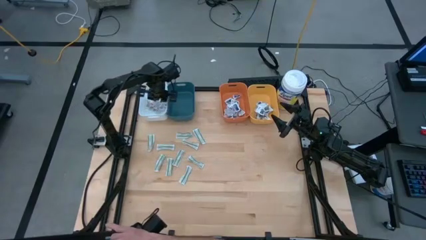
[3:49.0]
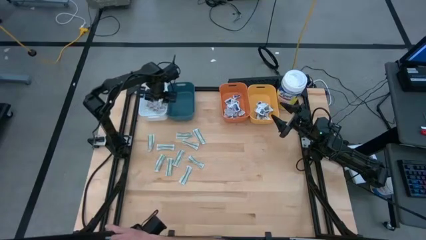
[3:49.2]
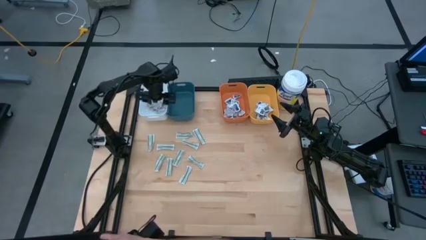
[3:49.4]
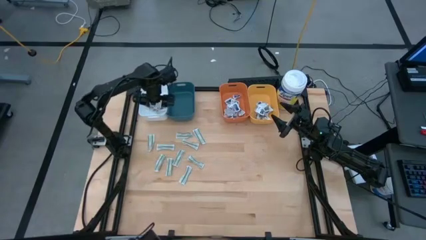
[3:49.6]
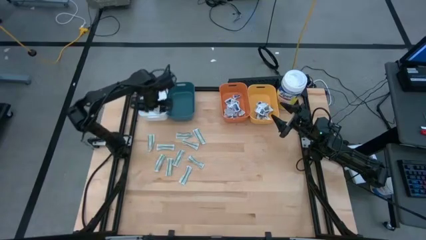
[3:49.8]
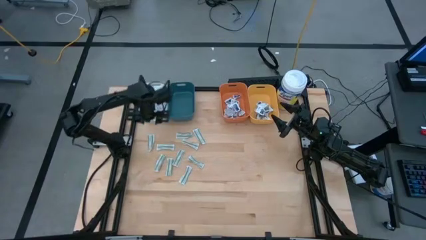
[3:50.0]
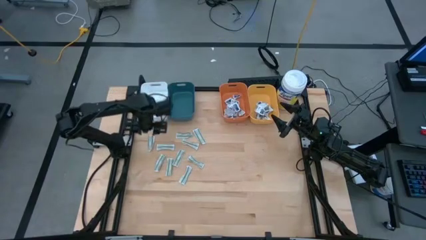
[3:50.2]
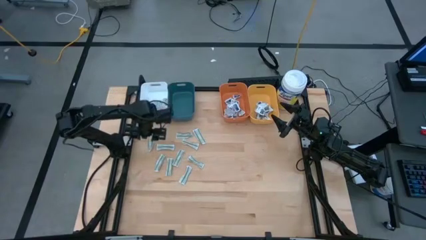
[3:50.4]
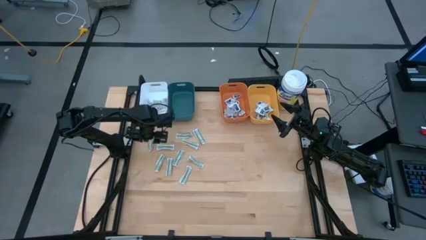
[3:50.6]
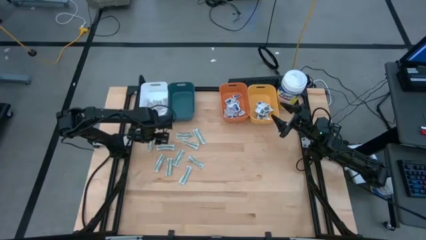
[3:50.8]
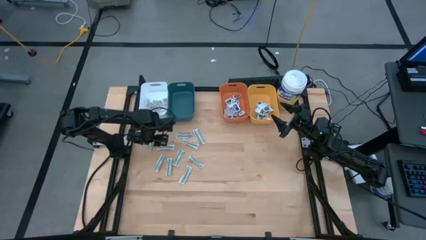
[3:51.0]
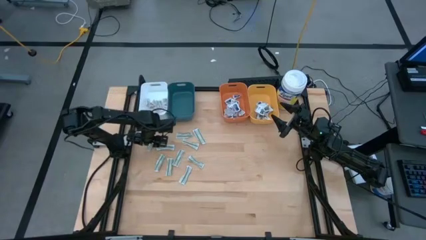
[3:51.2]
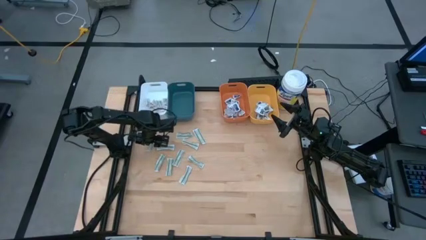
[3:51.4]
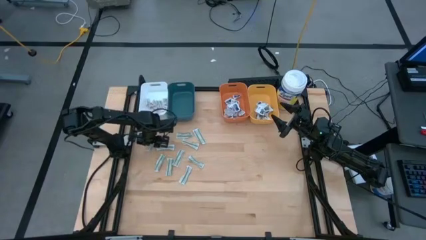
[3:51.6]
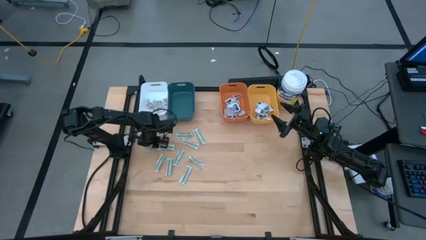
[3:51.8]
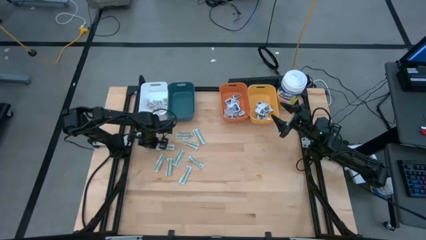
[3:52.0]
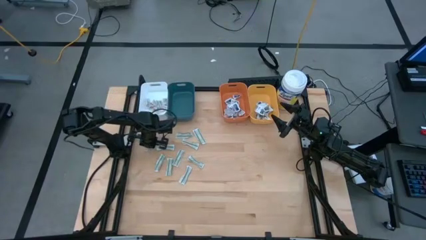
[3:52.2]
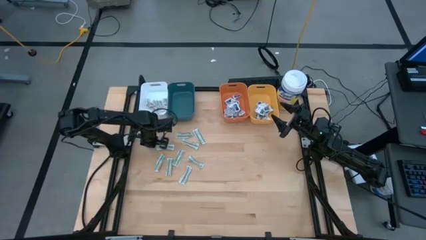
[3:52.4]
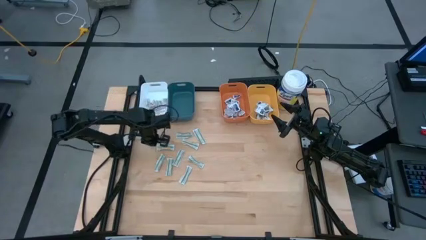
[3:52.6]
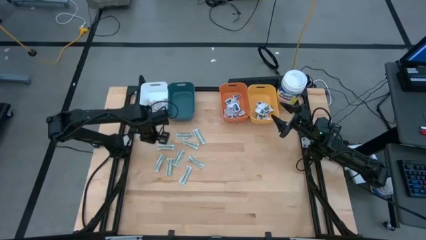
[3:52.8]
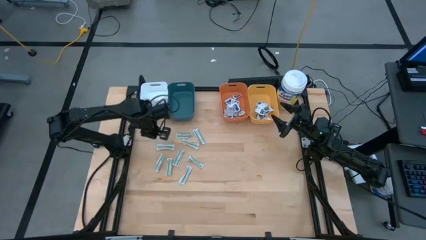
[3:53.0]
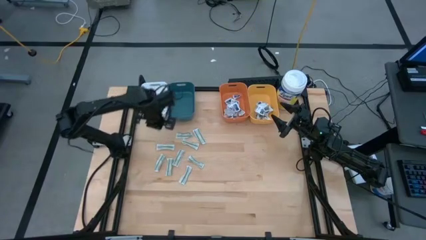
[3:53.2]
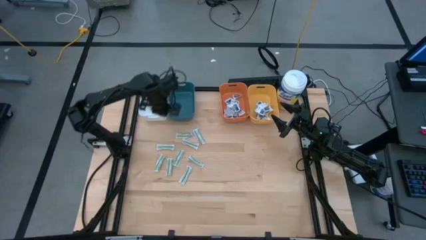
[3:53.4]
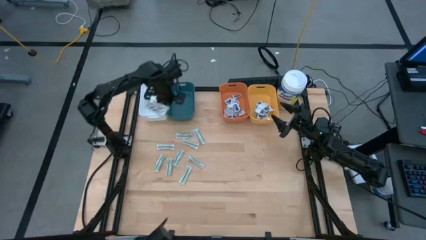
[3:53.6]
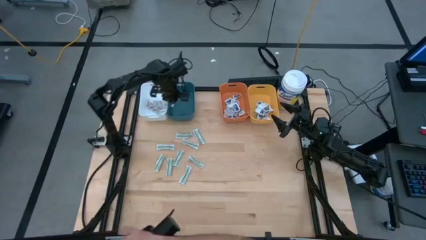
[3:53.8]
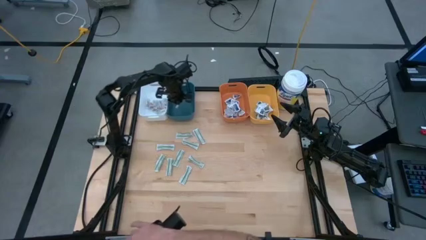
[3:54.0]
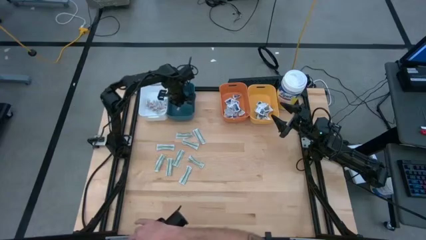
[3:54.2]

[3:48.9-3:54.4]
Task: Pick & Place First Aid Supplies
Put the bandage pack into the blue bin

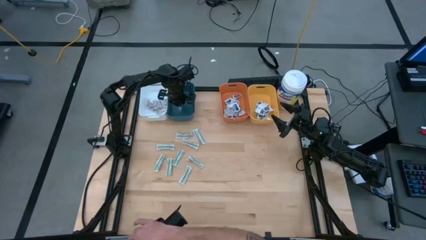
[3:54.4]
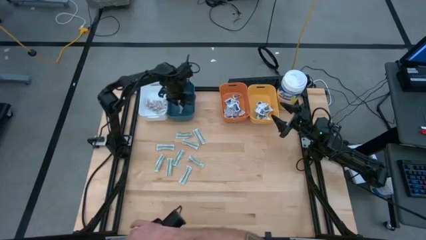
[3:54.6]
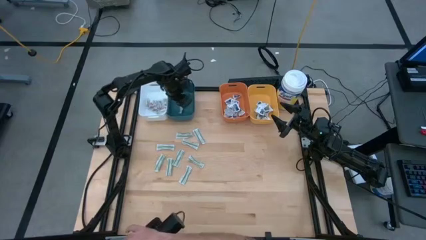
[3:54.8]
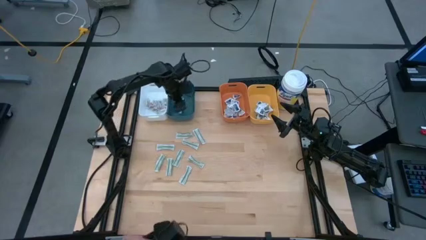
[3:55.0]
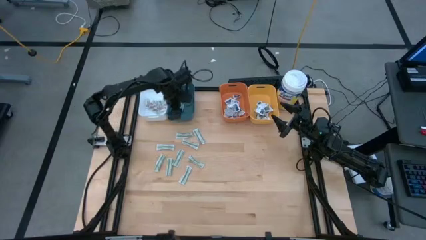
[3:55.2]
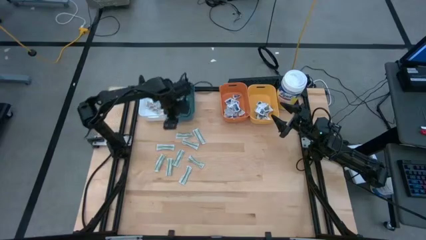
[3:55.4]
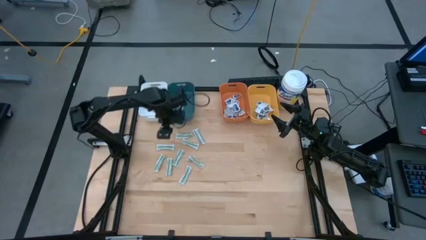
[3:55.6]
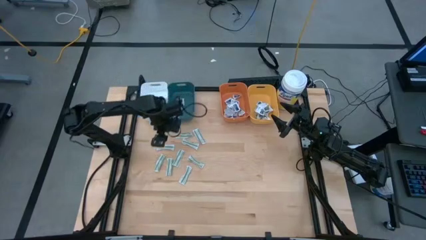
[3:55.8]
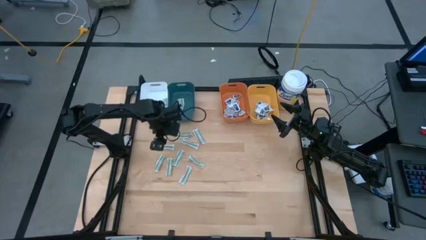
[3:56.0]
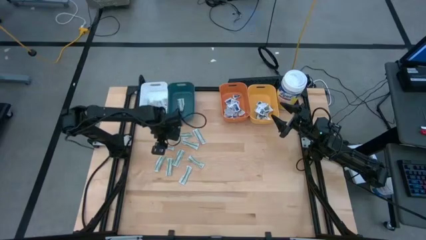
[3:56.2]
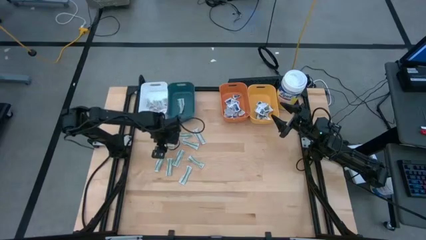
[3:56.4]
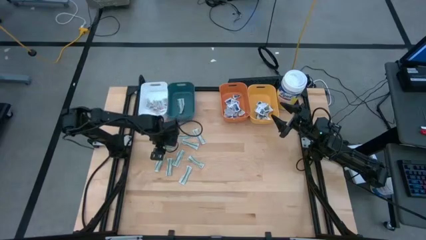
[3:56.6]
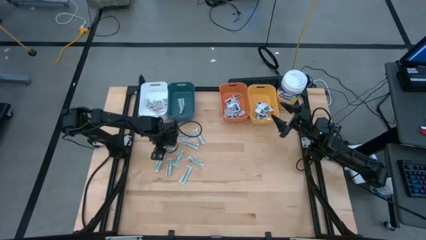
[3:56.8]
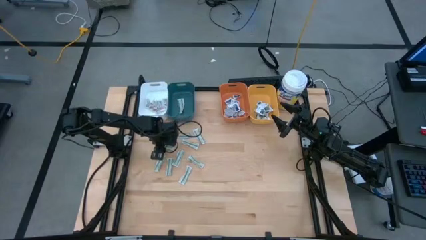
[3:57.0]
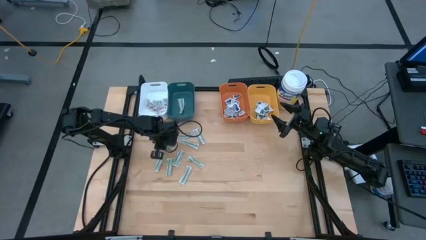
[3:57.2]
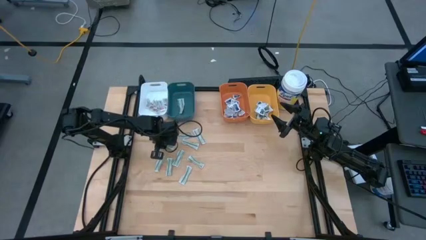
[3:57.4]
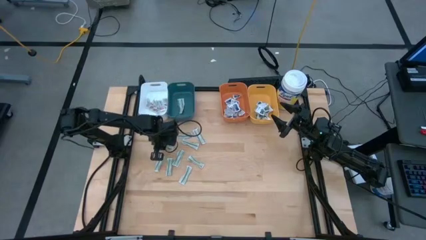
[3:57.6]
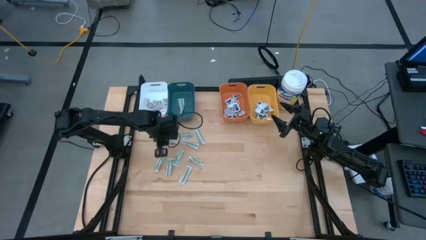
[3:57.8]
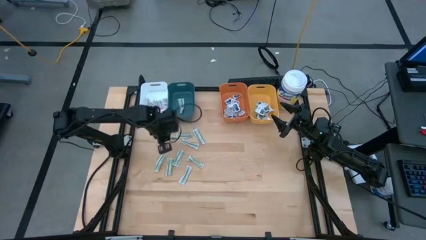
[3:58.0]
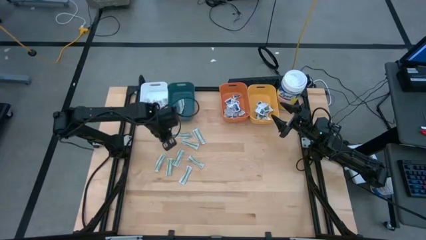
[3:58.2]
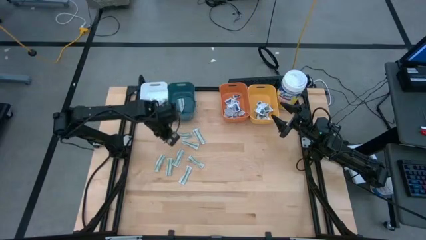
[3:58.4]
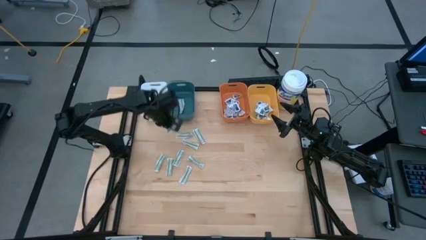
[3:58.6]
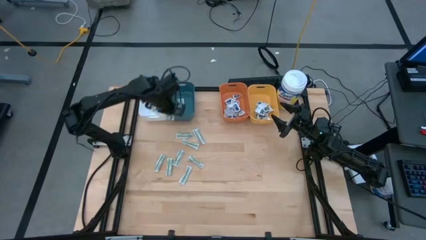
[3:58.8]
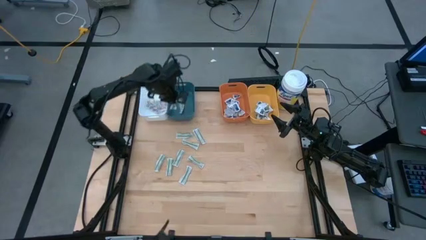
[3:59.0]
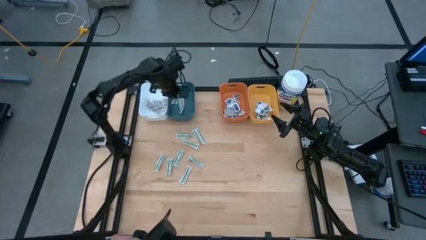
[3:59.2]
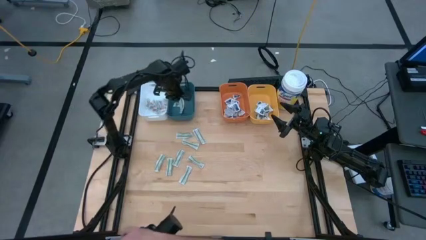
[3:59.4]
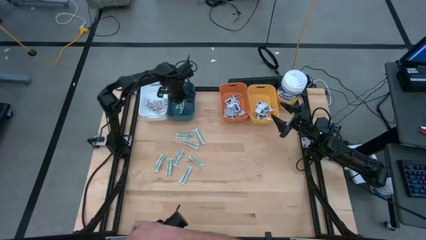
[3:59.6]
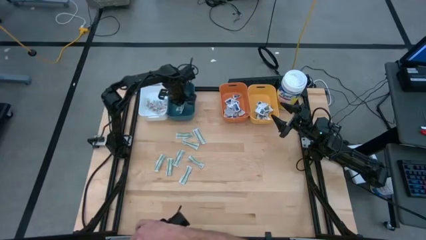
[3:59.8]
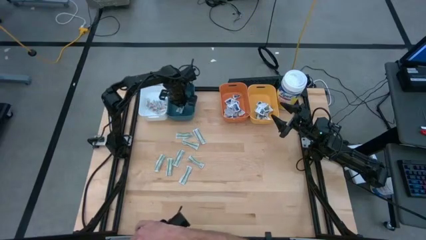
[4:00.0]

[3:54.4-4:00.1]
Put the bandage pack into the blue bin

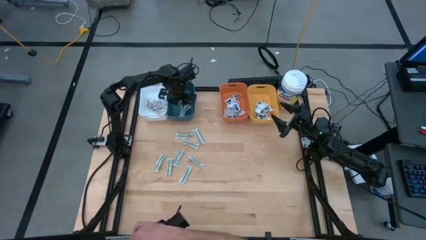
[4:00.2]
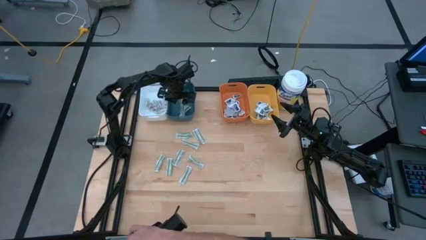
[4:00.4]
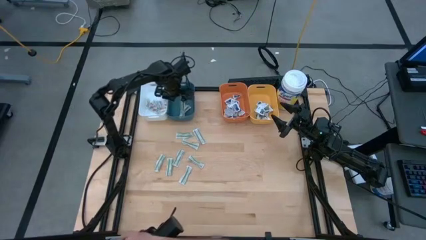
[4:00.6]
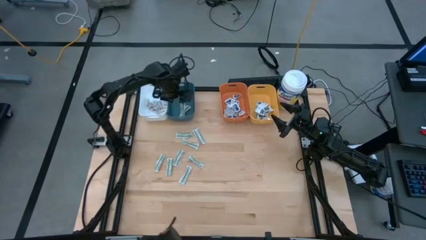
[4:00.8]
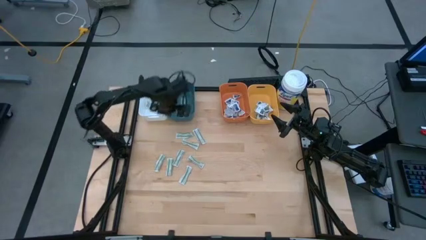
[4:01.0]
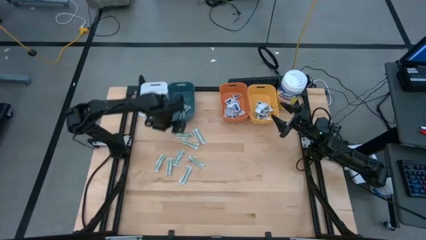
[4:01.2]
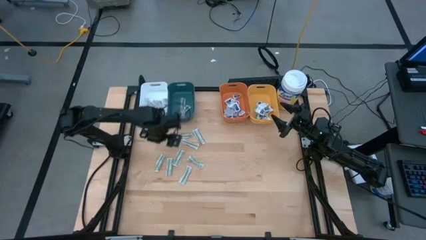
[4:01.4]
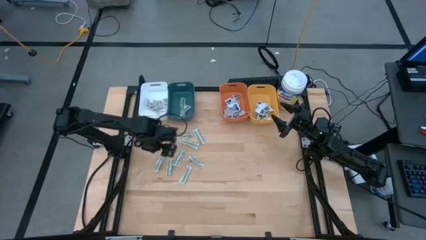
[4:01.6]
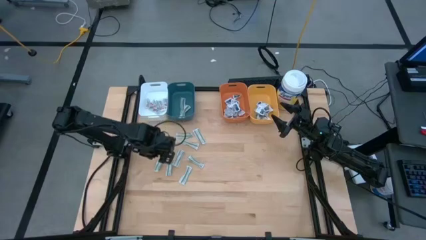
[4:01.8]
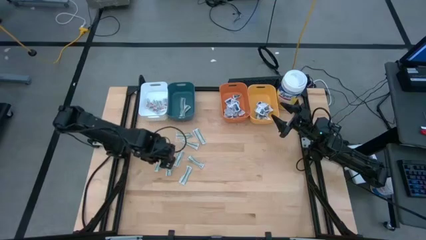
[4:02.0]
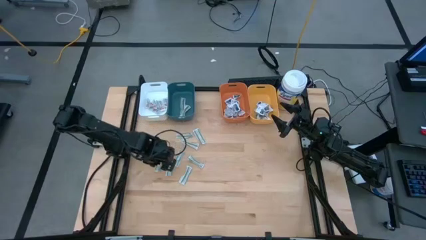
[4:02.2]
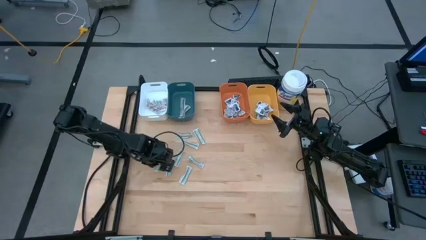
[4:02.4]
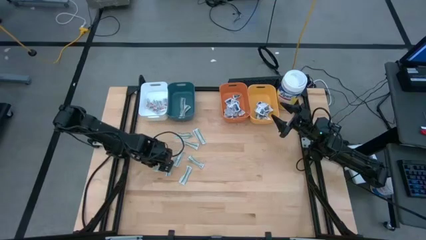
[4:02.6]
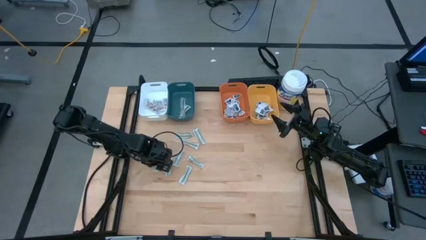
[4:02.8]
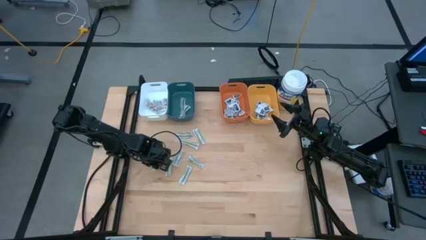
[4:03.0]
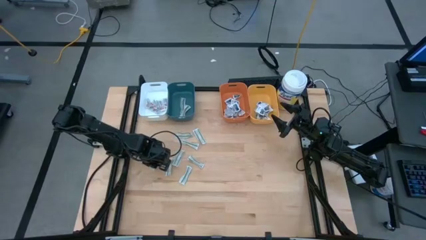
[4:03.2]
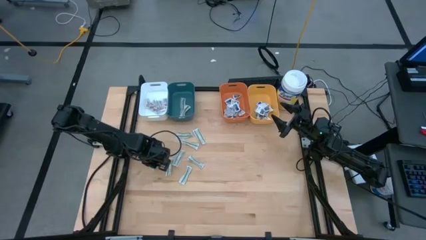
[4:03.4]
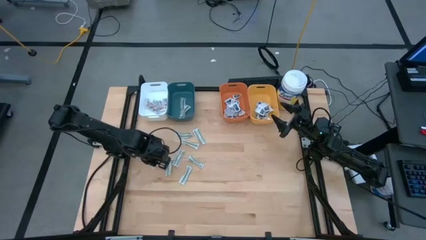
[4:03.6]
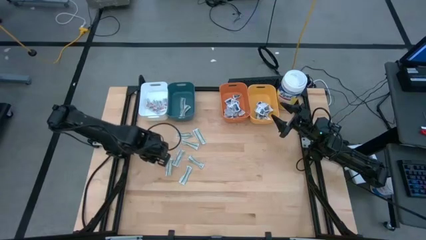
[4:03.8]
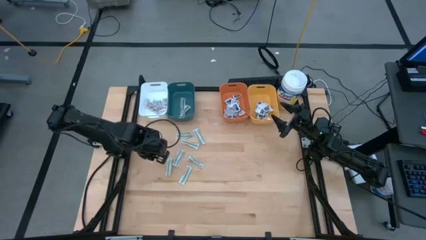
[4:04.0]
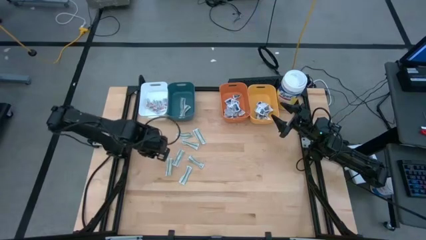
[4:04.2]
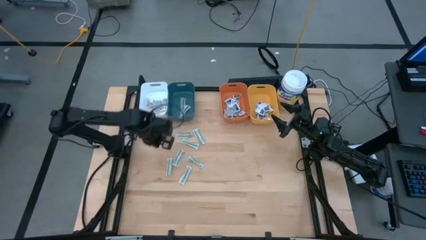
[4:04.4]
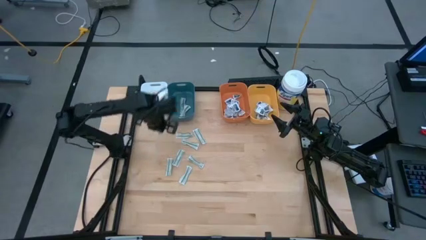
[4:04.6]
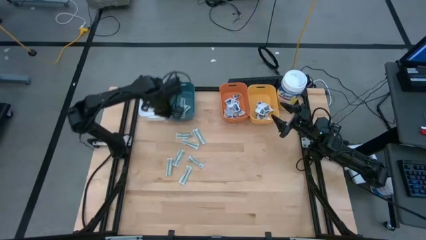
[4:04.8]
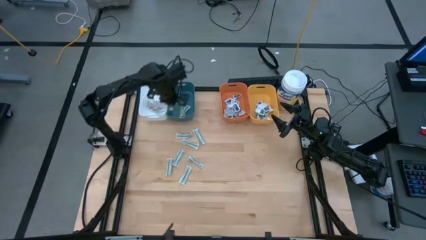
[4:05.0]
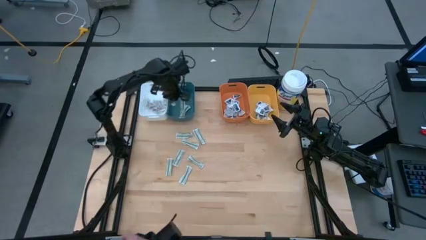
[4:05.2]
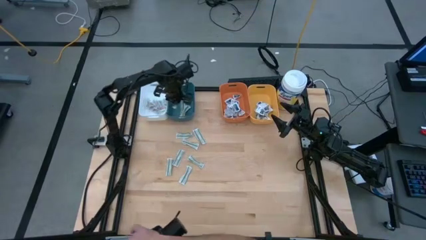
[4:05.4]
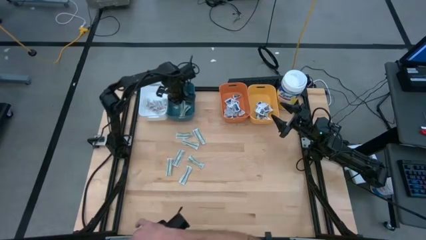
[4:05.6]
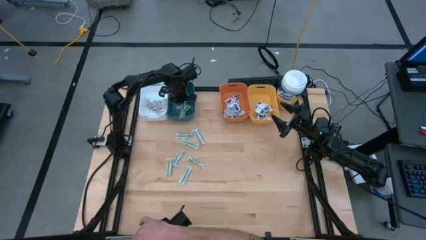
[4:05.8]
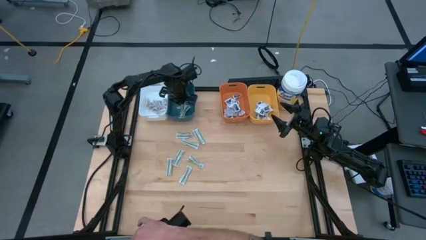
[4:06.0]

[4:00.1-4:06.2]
Put the bandage pack into the blue bin
